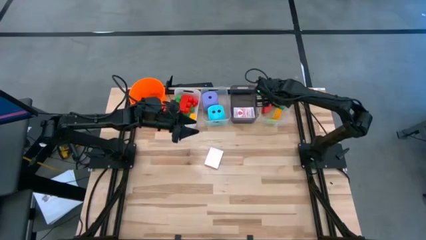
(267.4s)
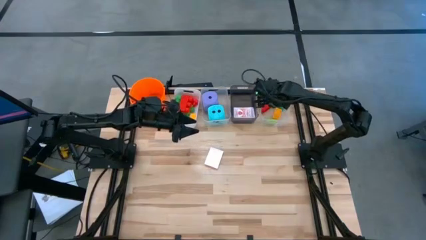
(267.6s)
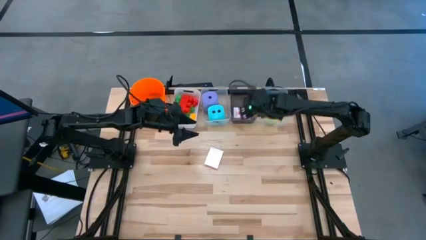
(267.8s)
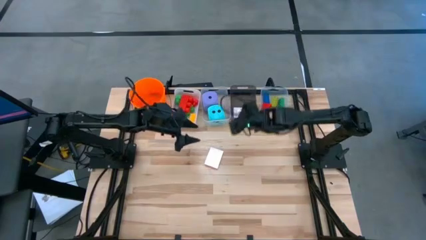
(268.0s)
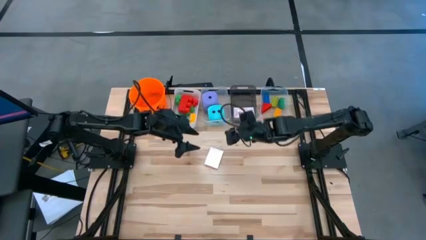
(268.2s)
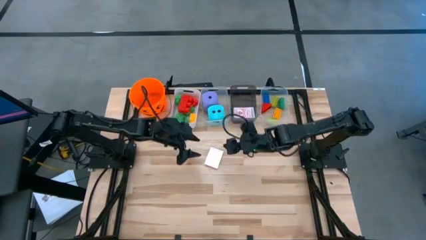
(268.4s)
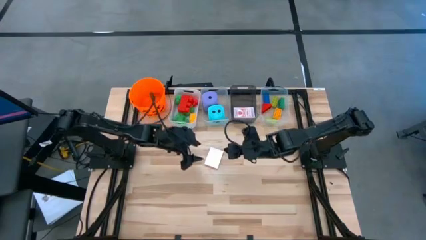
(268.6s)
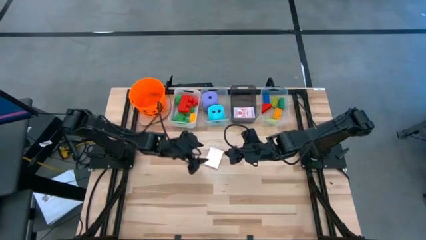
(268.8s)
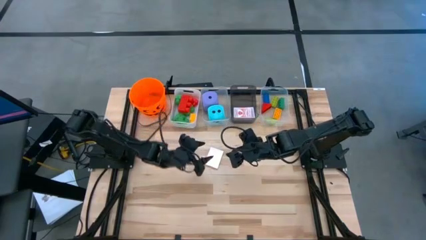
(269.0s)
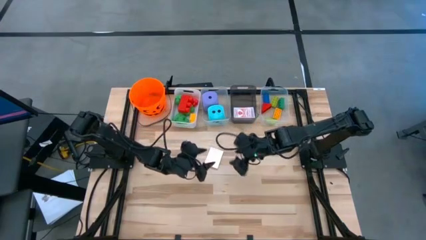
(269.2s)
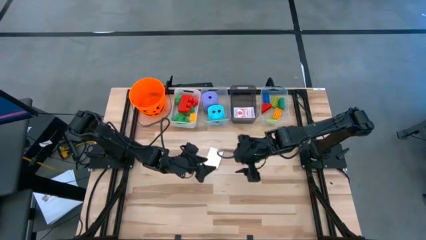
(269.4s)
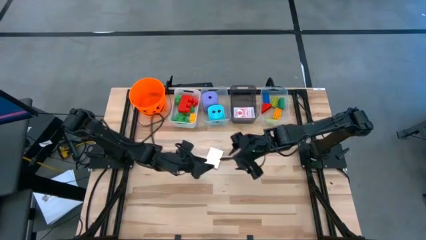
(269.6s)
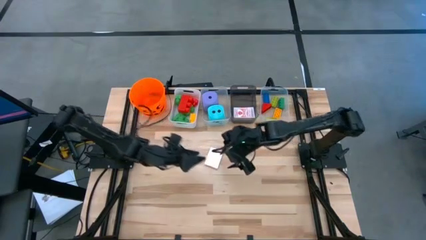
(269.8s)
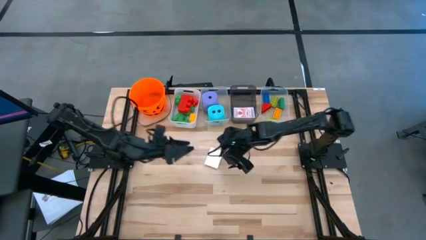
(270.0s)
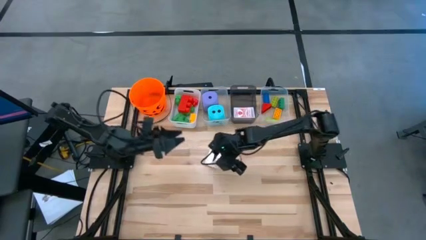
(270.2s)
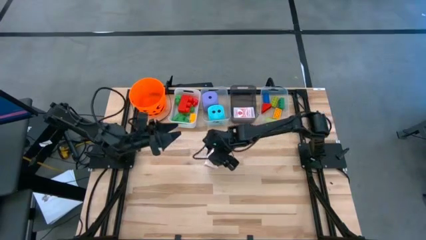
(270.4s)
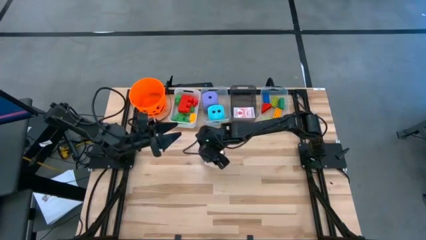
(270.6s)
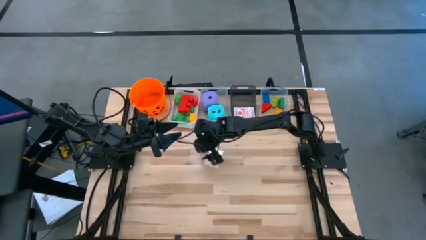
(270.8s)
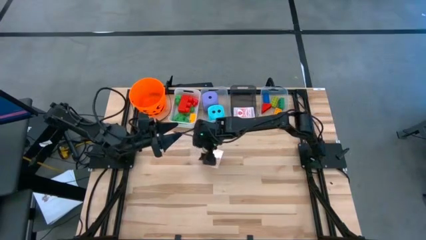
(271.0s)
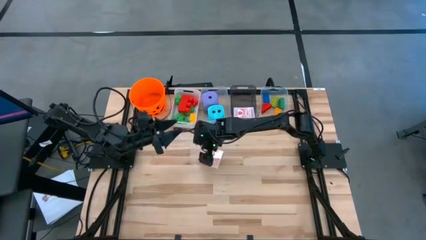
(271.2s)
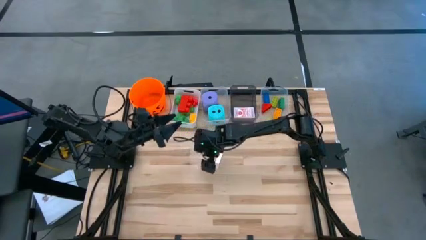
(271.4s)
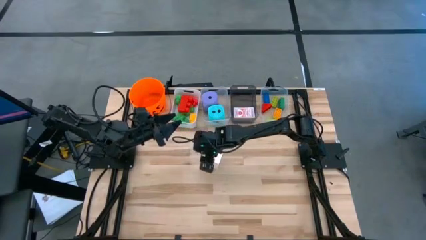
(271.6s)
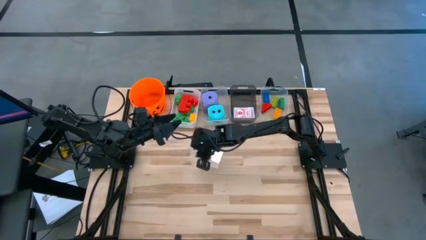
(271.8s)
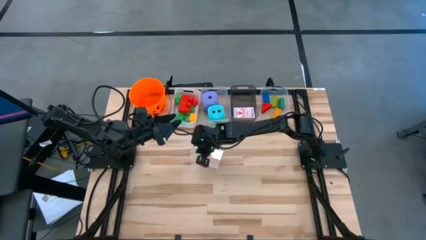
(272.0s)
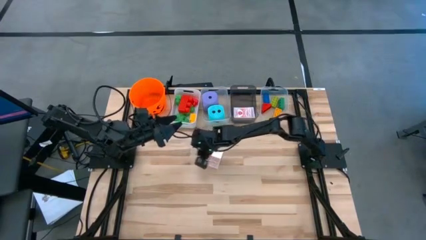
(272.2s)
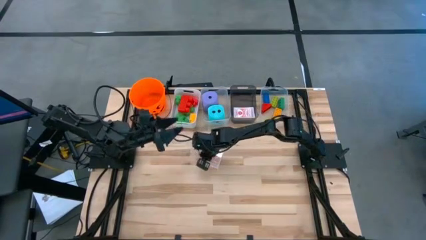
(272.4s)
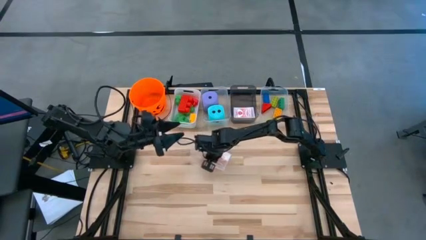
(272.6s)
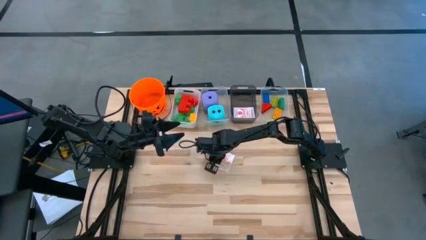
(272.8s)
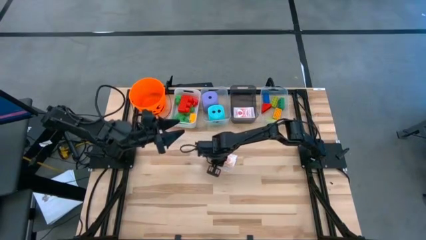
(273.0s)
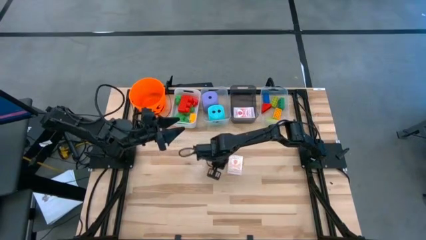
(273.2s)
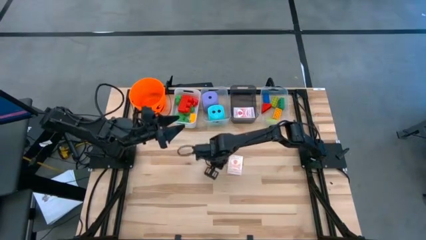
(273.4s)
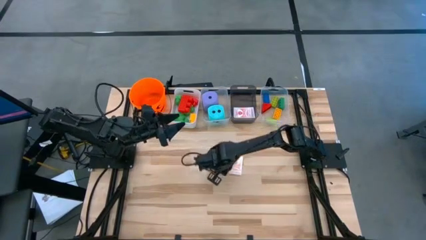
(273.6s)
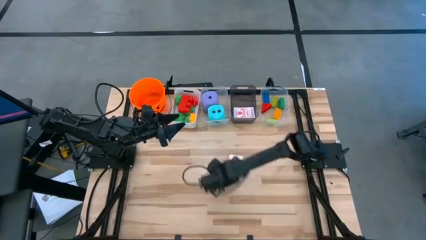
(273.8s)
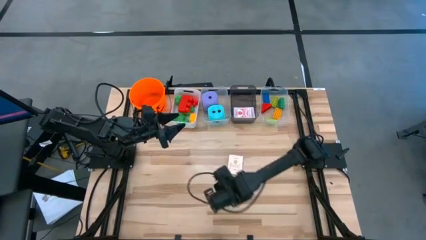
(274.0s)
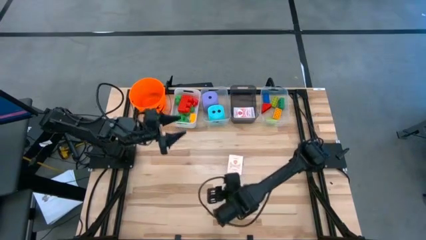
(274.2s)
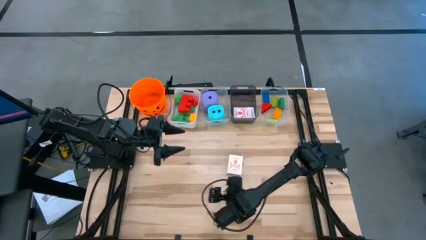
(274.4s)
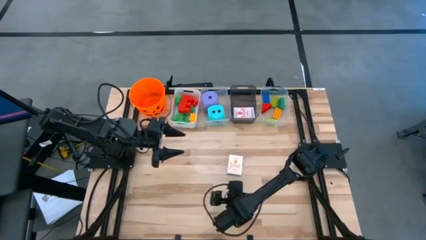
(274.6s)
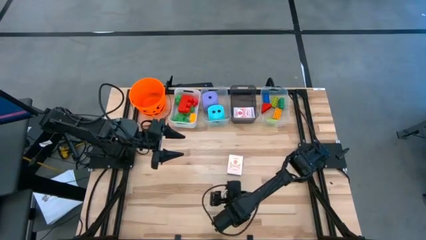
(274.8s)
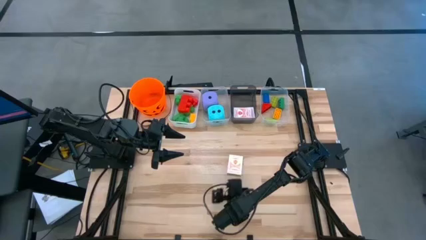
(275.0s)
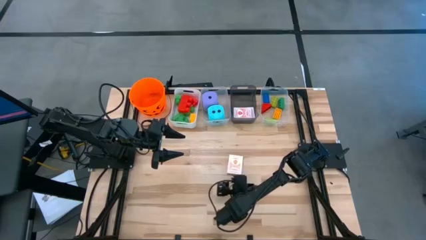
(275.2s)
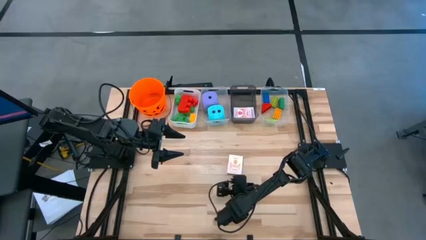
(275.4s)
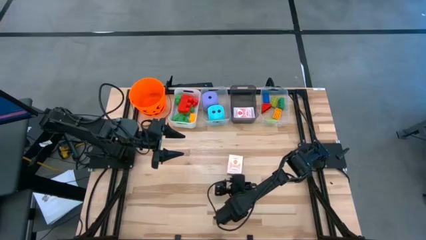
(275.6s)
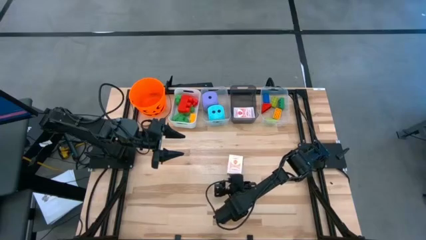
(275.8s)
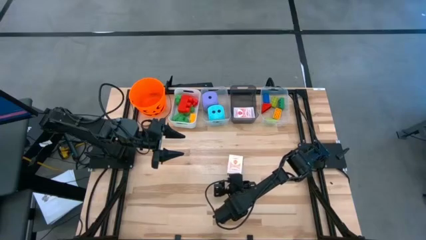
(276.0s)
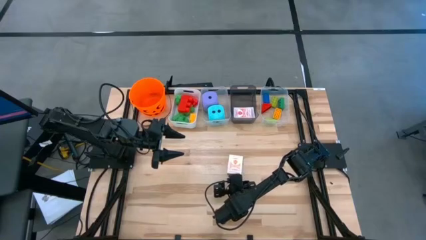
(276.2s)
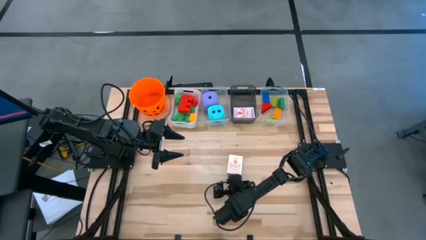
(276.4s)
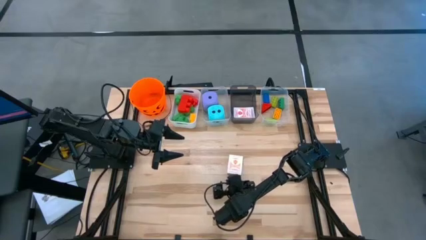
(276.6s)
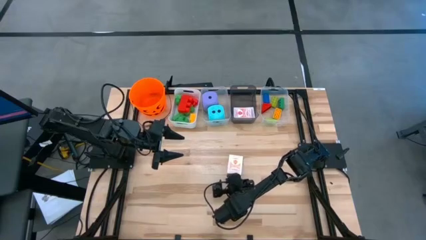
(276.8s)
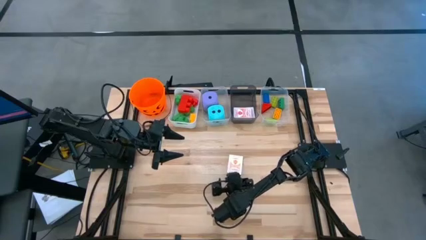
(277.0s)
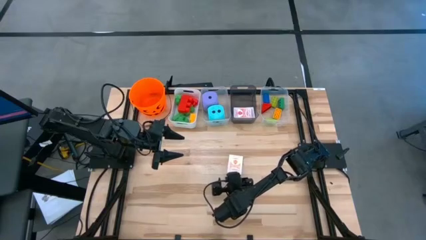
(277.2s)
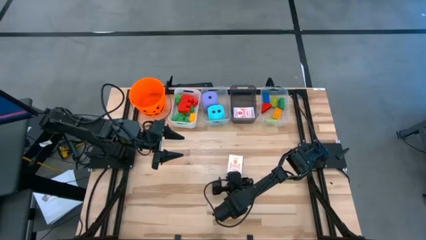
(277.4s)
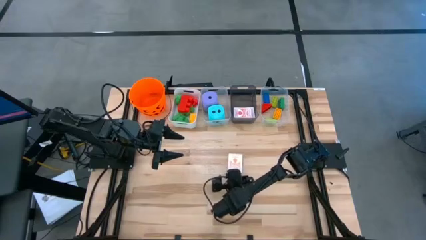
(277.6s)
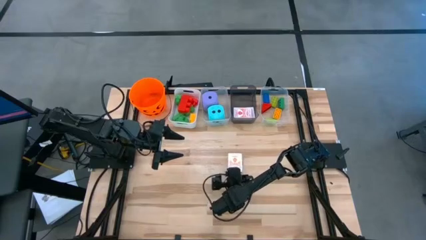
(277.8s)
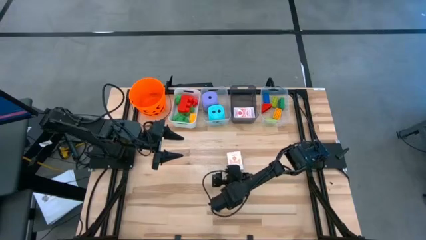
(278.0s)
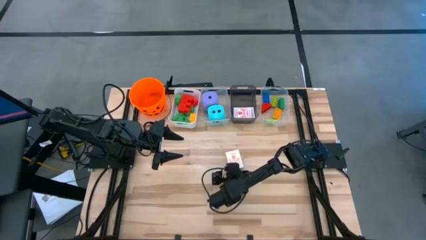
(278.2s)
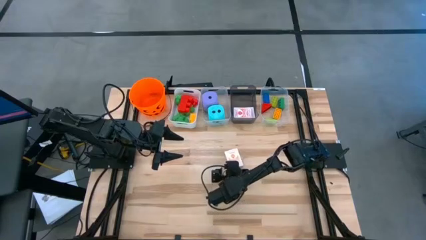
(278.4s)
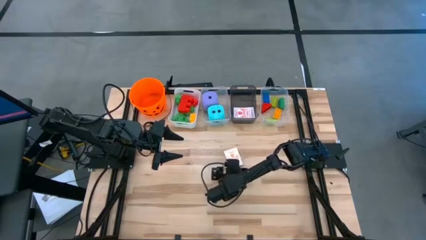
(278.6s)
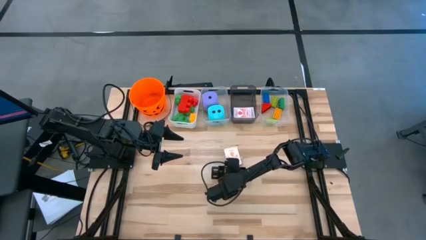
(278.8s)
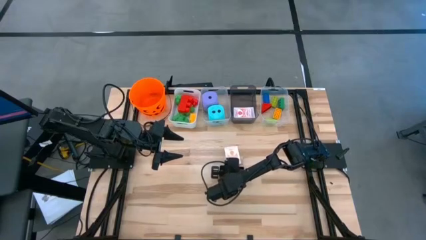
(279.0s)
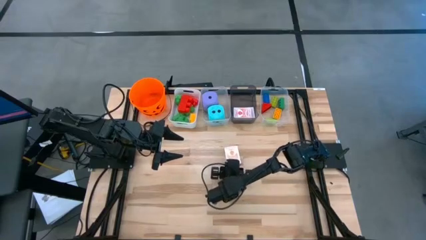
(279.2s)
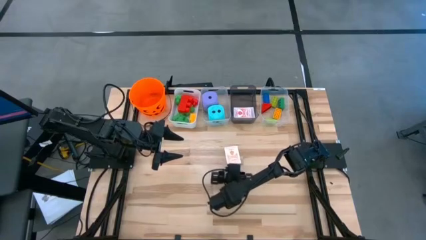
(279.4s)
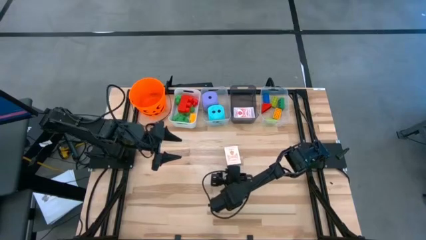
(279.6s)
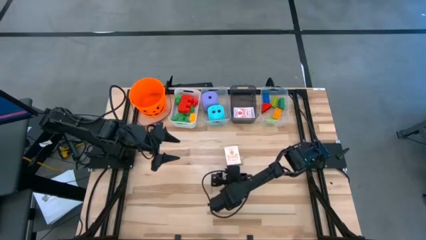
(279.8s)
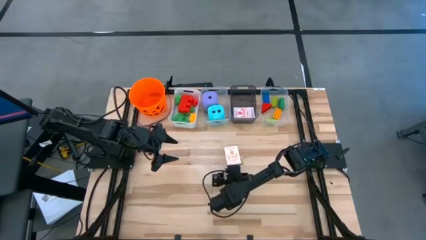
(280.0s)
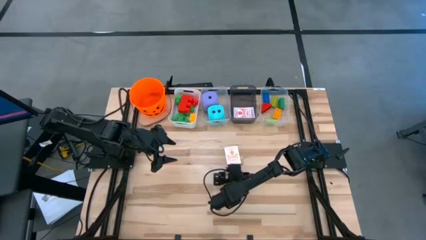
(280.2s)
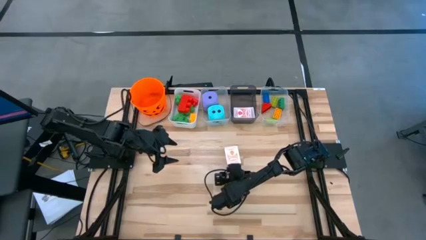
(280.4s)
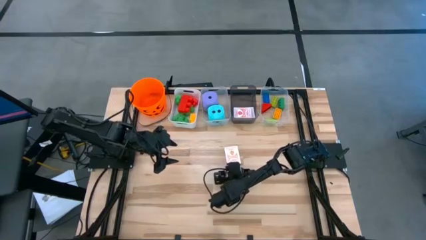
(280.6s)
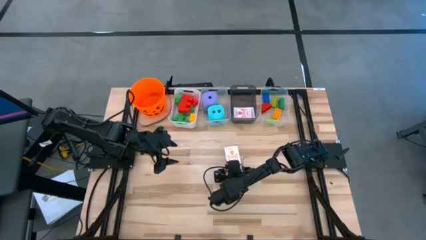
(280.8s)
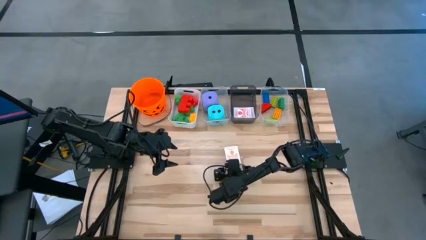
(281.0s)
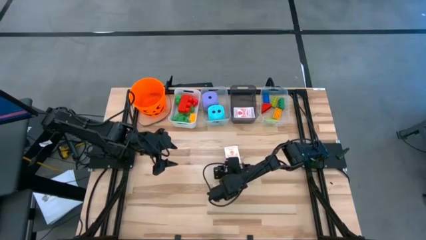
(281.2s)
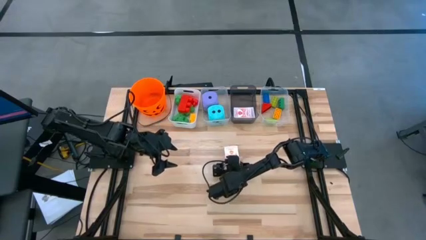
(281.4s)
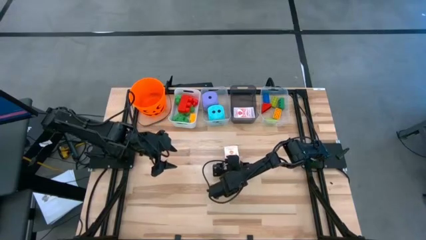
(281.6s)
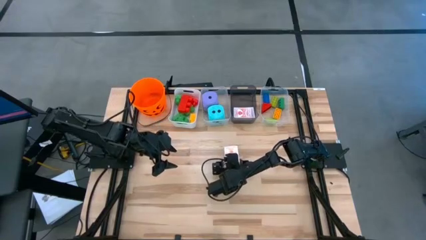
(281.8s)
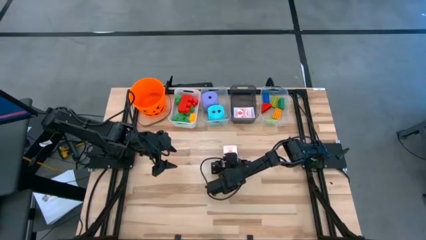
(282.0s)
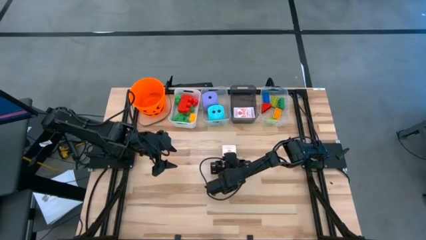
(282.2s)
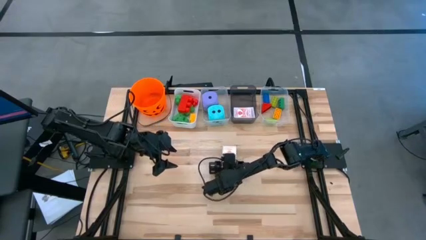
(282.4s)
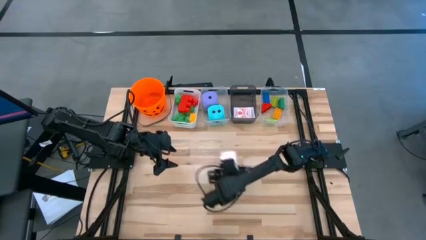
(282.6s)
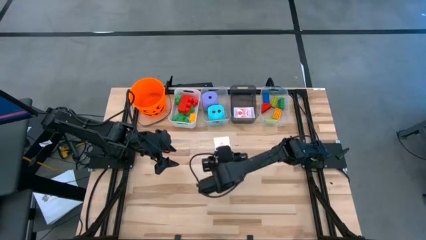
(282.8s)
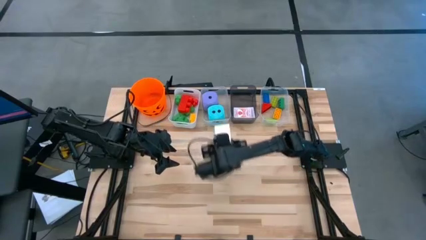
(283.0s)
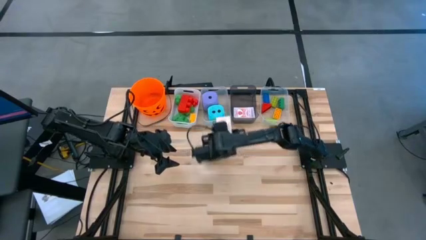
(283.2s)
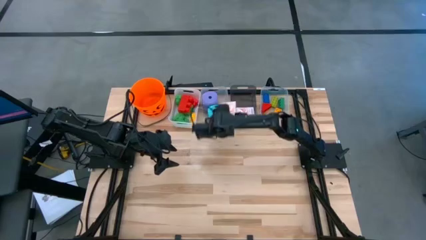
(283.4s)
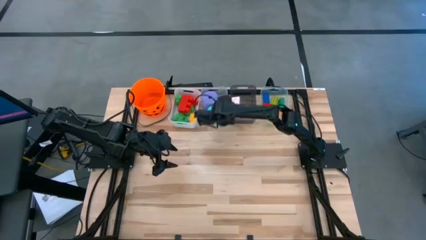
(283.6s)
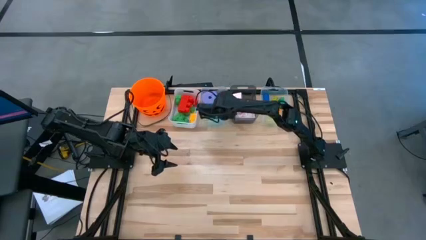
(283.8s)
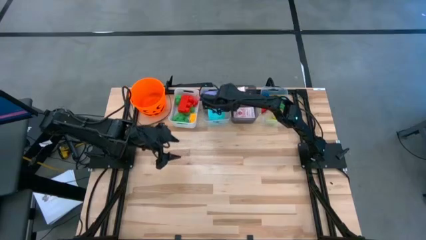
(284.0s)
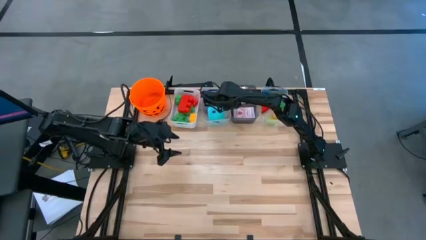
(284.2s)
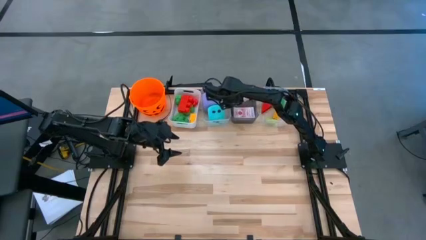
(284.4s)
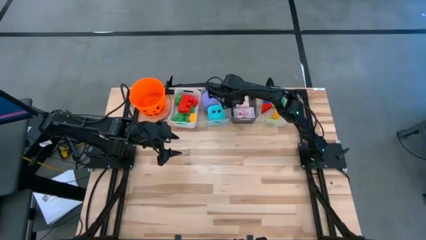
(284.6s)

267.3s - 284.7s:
Task: Pick & Place Toys
Put the orange deck of cards into the black bin
